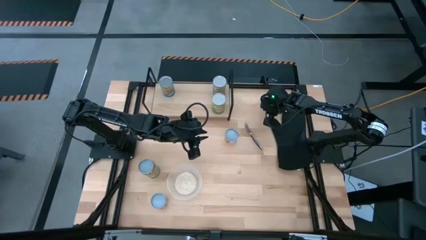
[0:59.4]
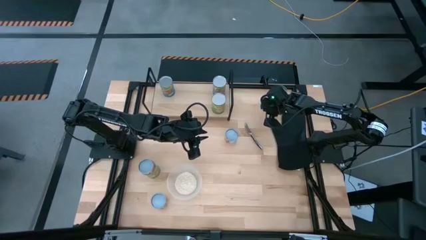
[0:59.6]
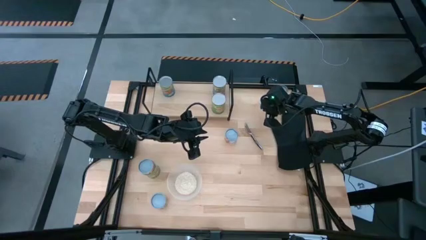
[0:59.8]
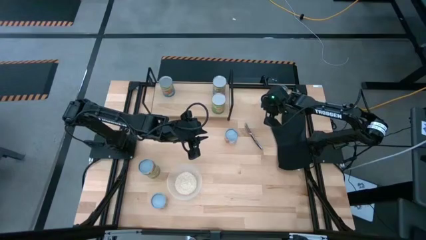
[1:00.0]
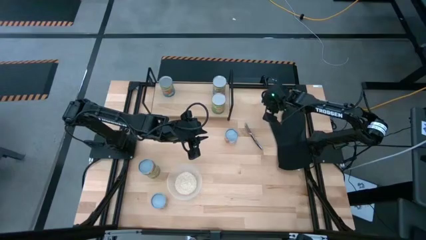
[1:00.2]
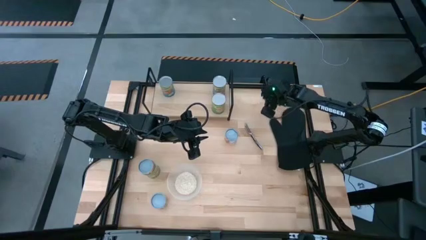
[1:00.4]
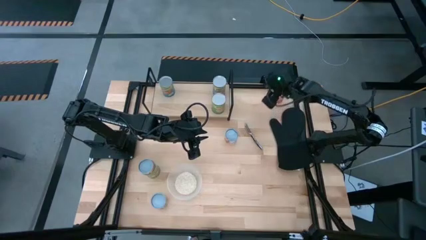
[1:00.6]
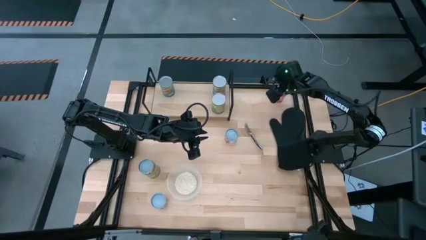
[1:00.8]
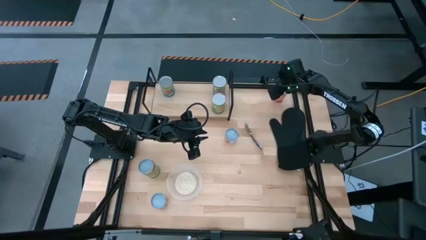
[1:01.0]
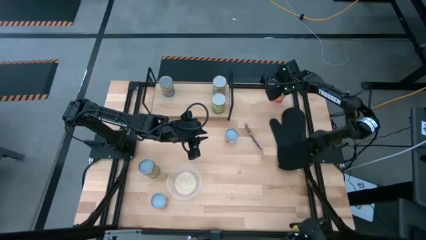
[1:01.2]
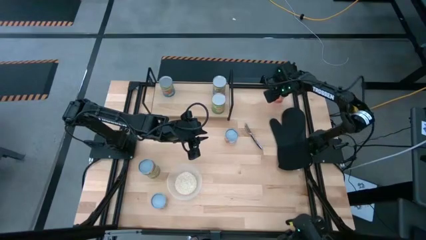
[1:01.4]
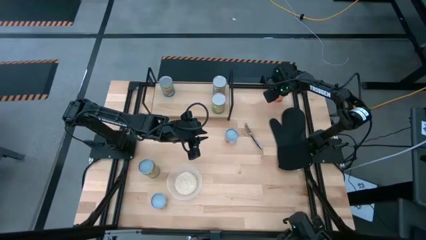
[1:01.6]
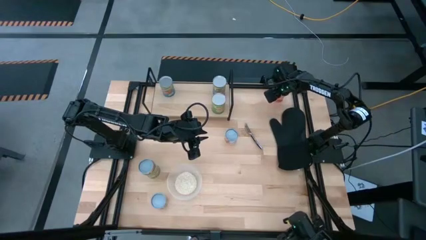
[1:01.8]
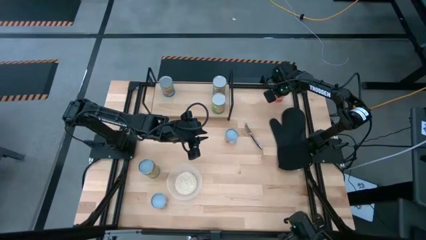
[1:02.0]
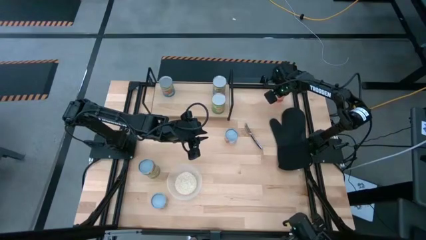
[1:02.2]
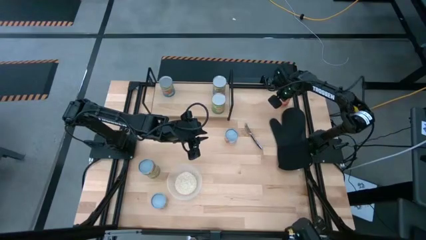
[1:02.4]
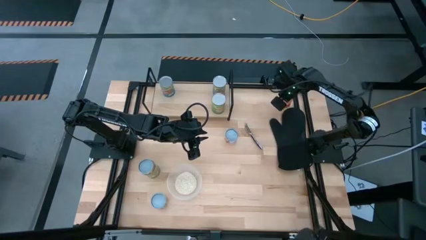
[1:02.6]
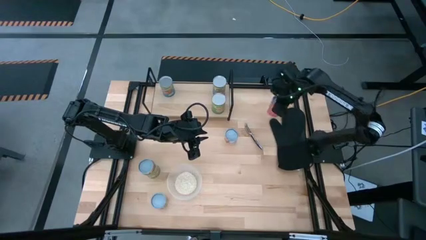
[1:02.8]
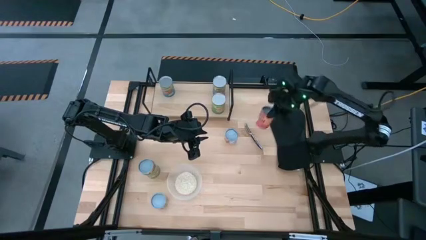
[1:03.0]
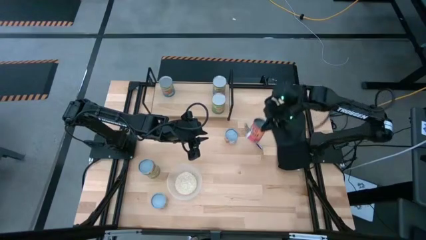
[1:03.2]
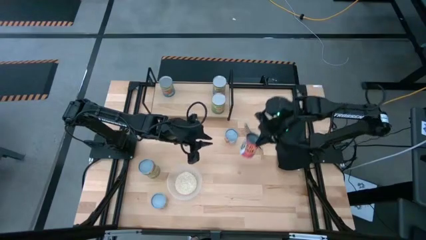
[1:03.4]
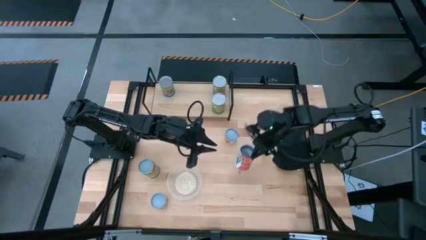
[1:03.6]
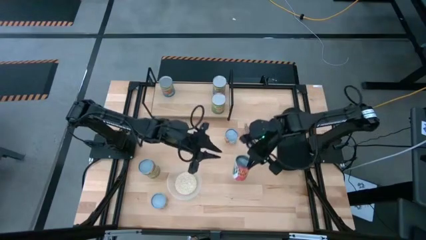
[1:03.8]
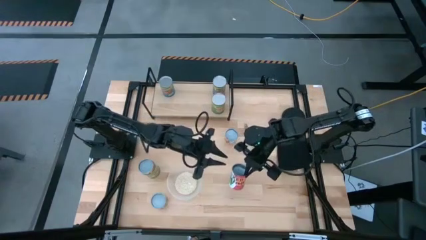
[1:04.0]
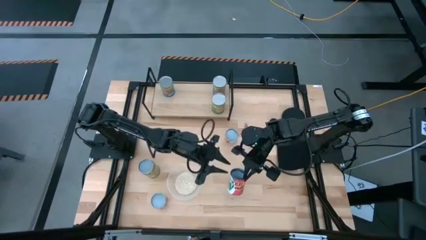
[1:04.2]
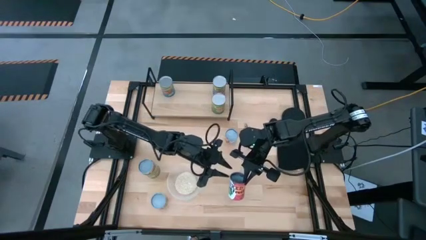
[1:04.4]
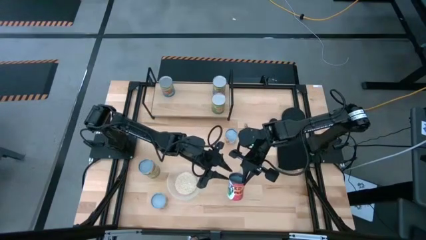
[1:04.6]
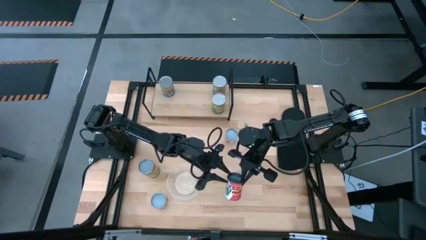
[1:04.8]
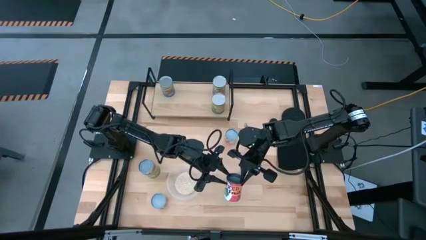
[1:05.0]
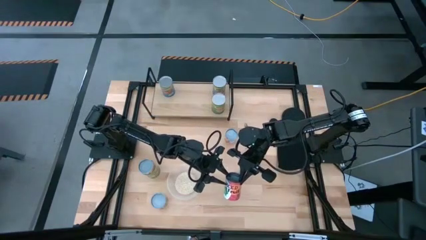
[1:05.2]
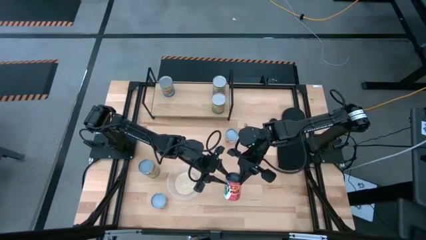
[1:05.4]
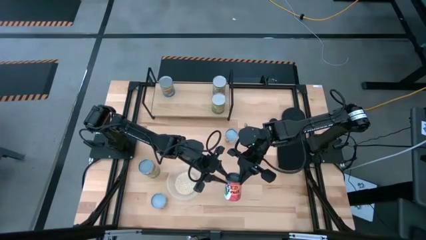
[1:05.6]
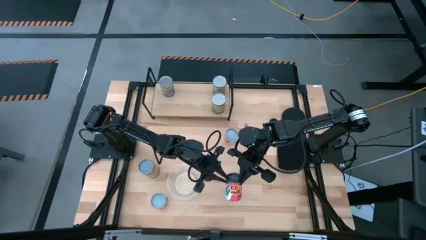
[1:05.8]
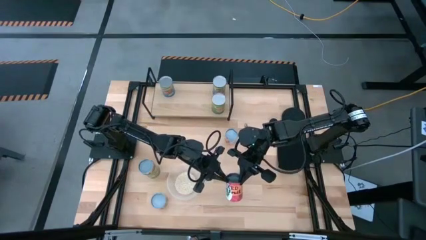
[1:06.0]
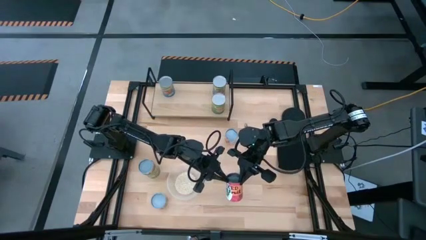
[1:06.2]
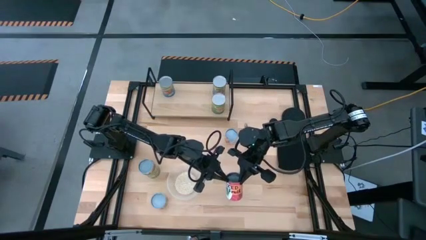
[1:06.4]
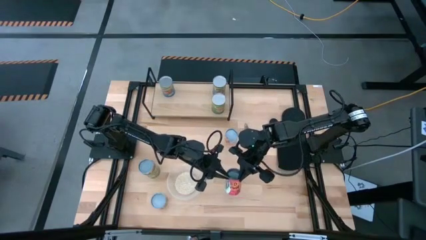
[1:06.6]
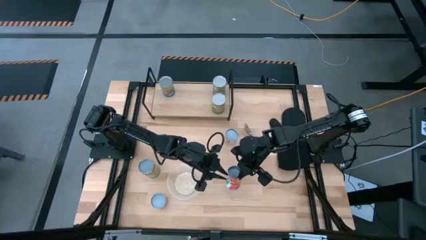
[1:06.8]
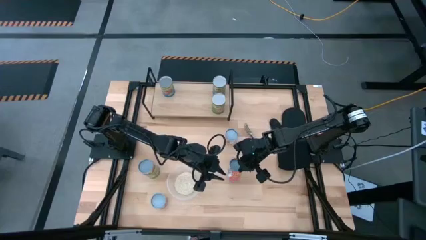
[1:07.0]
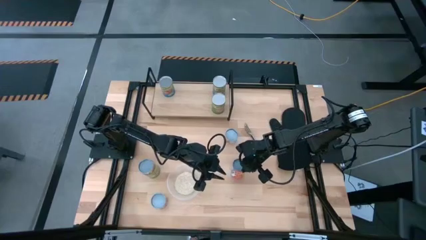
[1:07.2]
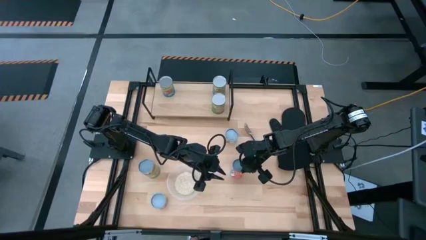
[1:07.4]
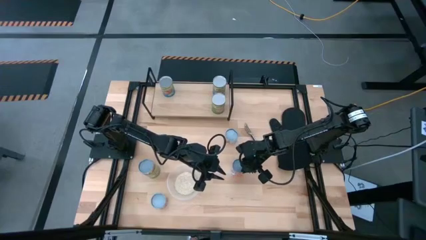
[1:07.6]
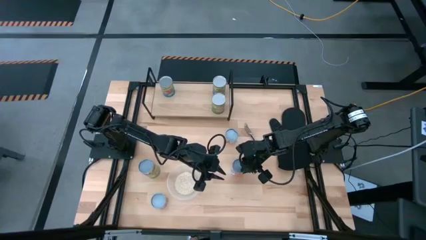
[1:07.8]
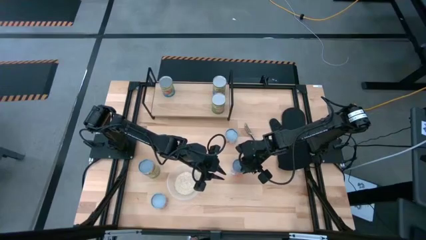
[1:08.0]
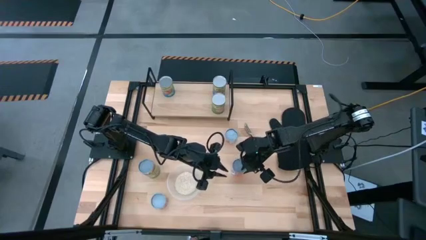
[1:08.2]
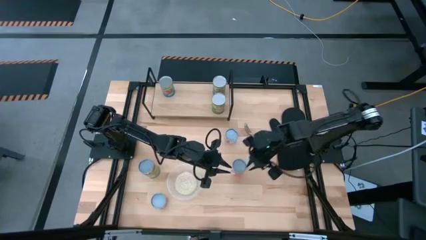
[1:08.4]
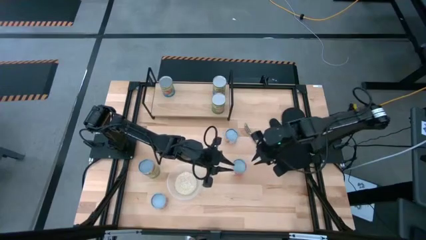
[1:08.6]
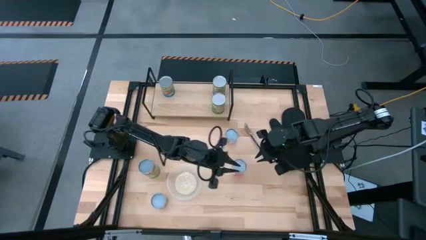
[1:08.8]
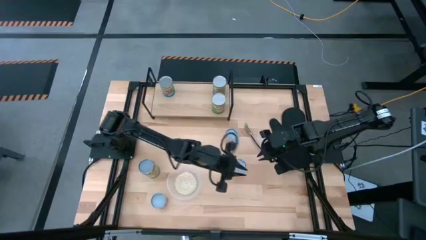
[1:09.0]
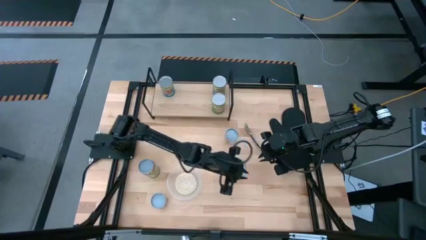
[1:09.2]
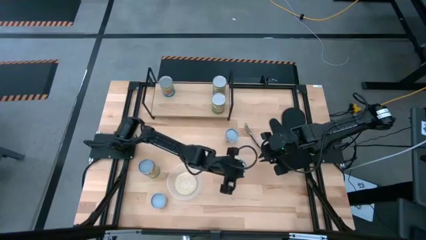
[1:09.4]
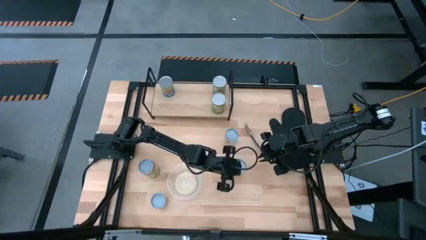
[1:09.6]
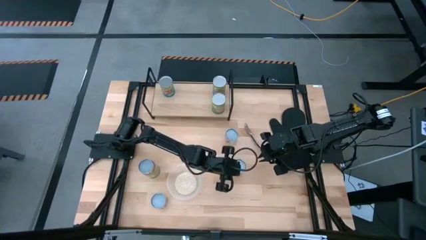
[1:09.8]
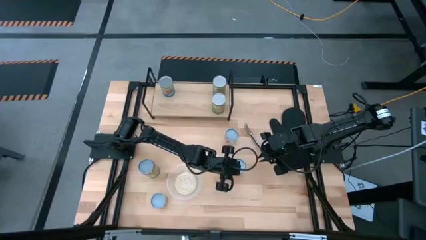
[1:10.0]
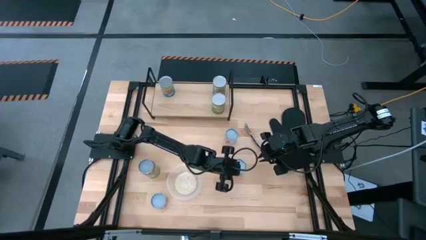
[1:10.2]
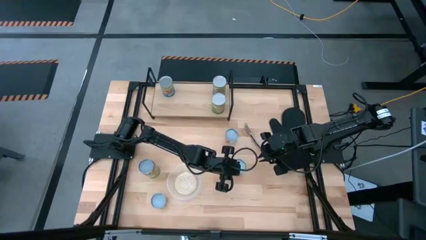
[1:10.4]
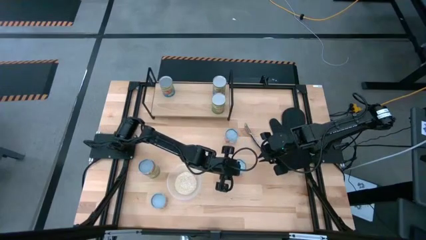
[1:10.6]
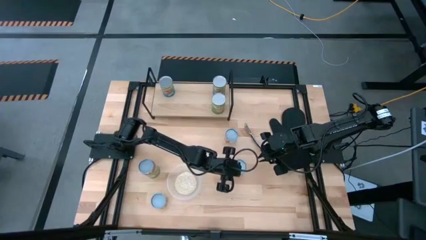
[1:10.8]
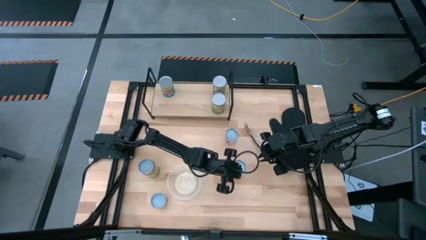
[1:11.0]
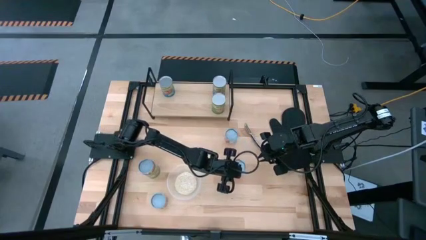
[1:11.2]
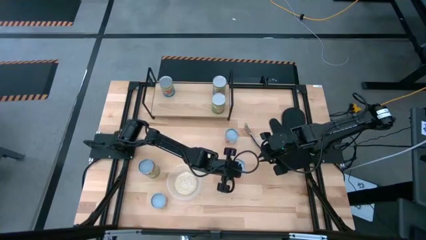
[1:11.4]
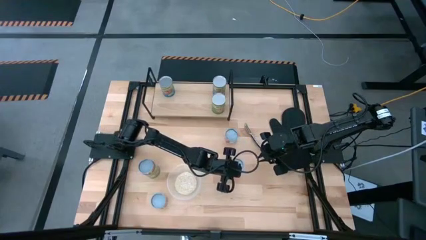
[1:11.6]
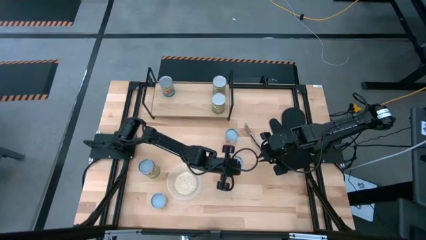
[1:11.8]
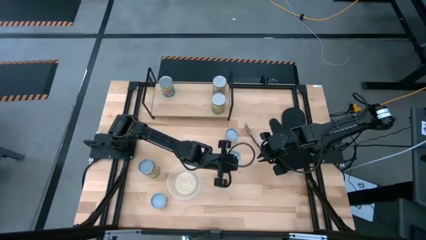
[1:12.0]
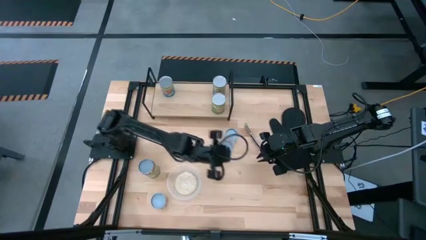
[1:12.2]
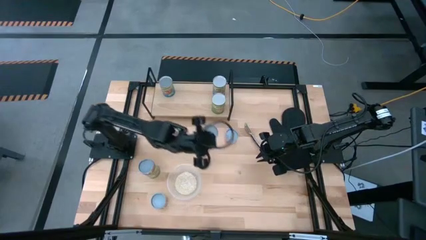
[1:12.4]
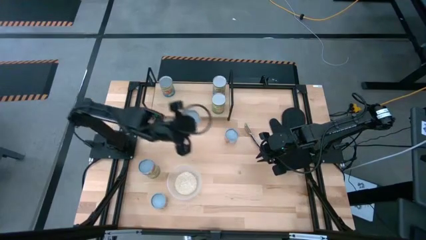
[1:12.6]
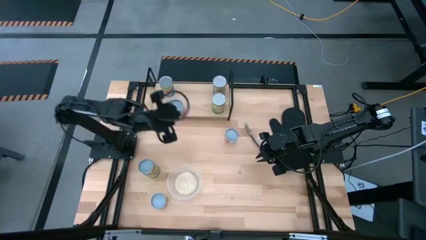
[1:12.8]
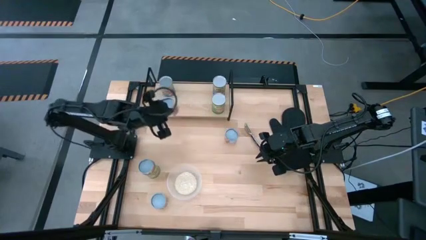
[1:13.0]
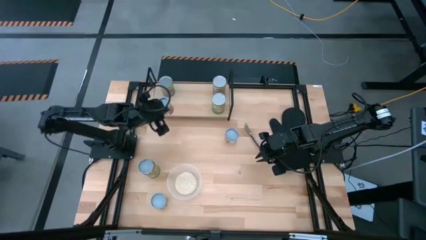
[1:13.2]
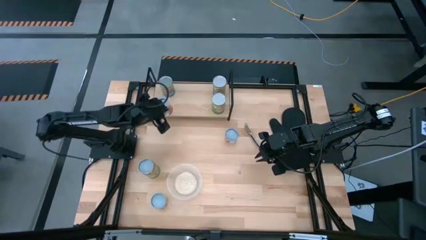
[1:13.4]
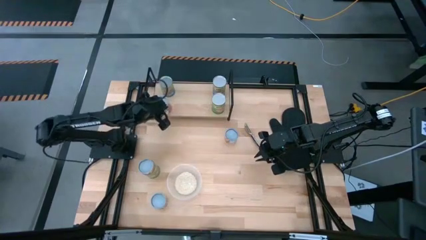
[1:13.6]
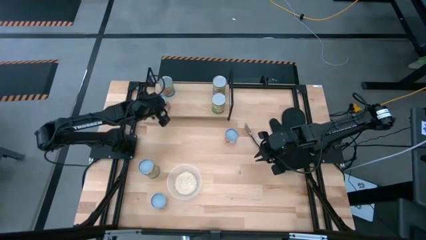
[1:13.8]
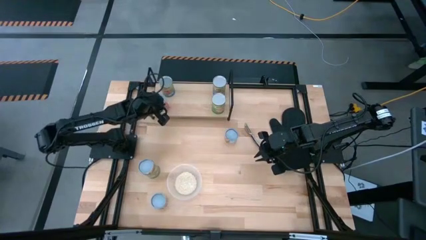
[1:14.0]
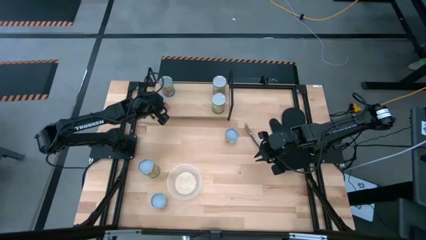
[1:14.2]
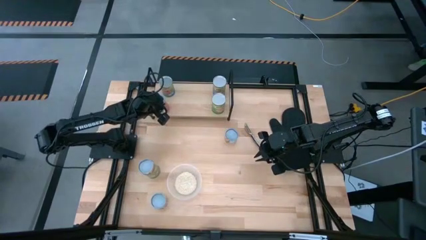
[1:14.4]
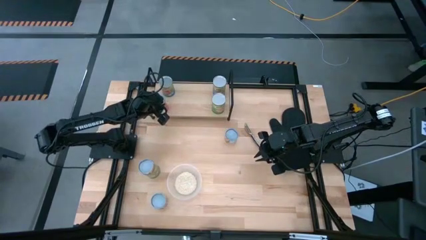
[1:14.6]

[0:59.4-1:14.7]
Task: Pick and place cans onto a shelf
Put the canned mixed fruits on the shelf
